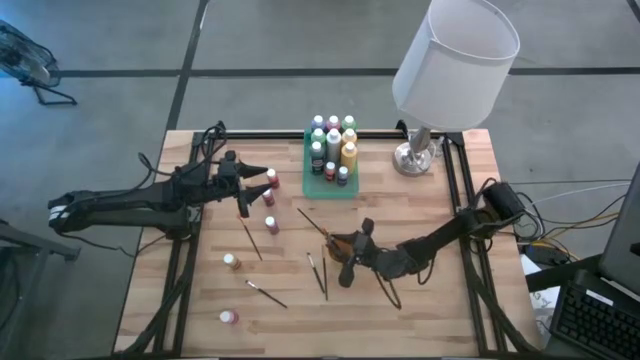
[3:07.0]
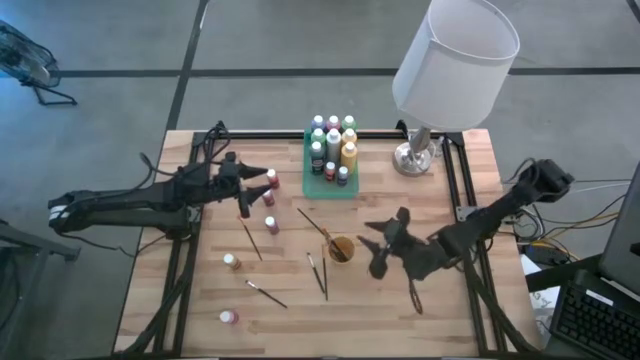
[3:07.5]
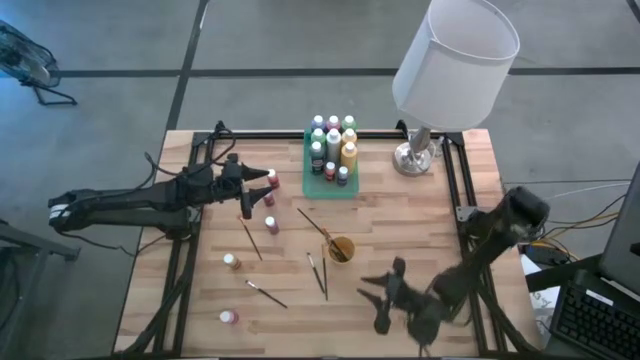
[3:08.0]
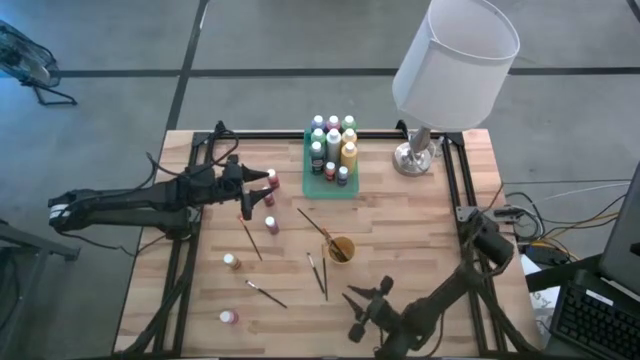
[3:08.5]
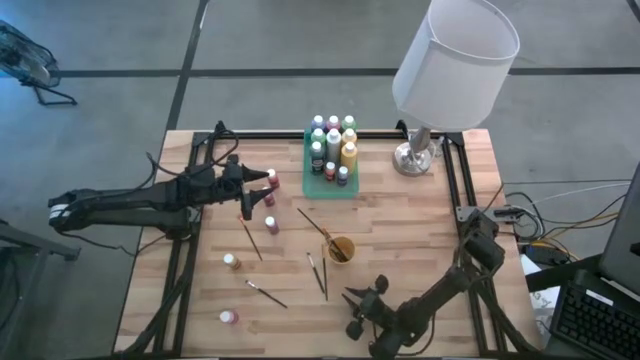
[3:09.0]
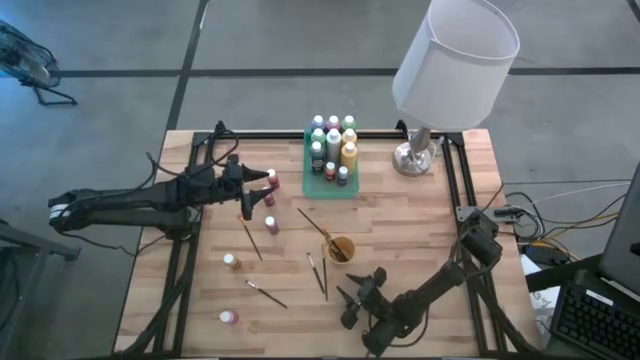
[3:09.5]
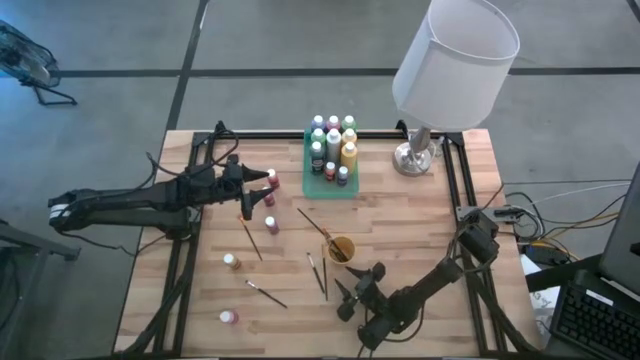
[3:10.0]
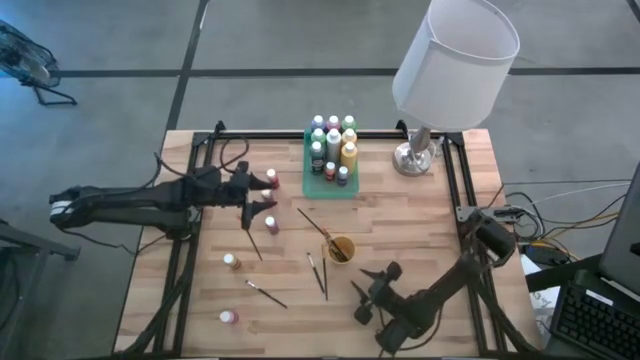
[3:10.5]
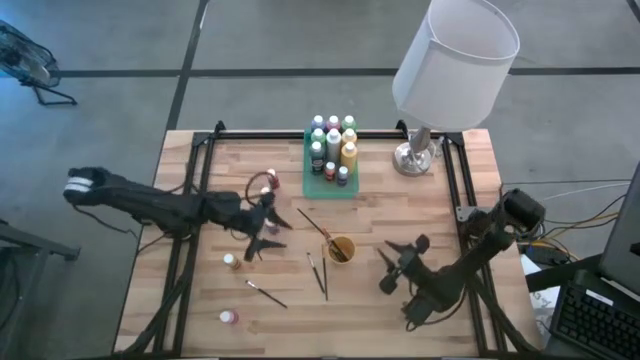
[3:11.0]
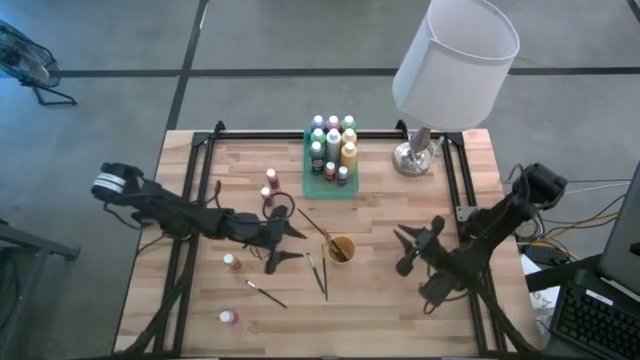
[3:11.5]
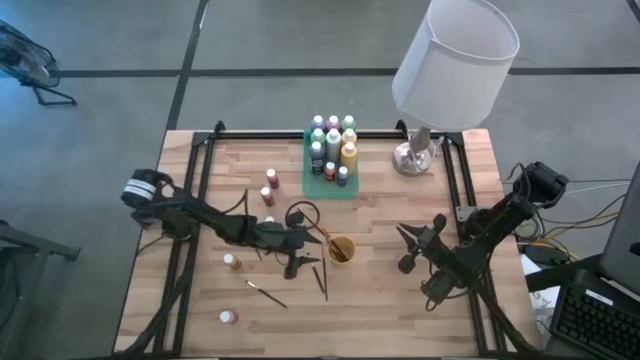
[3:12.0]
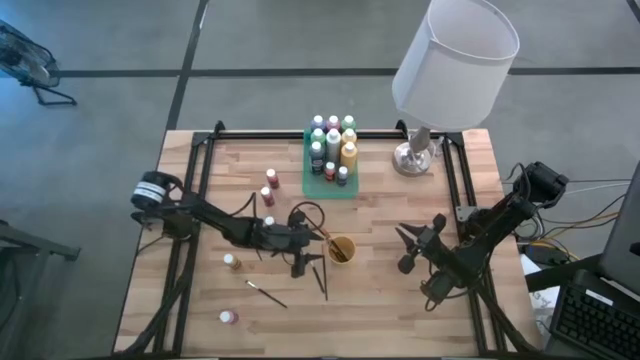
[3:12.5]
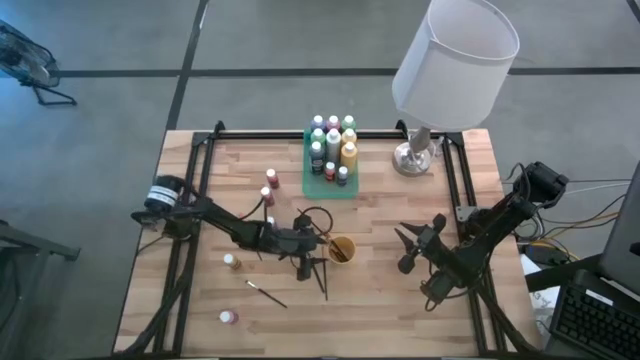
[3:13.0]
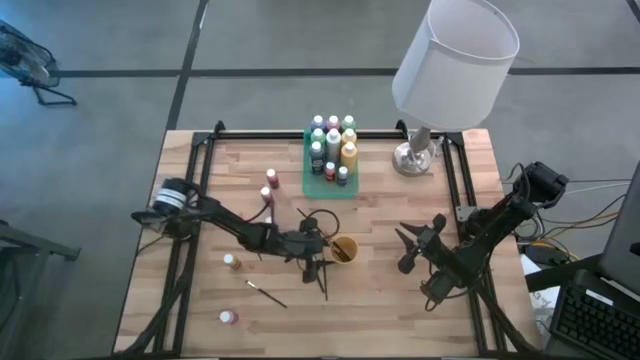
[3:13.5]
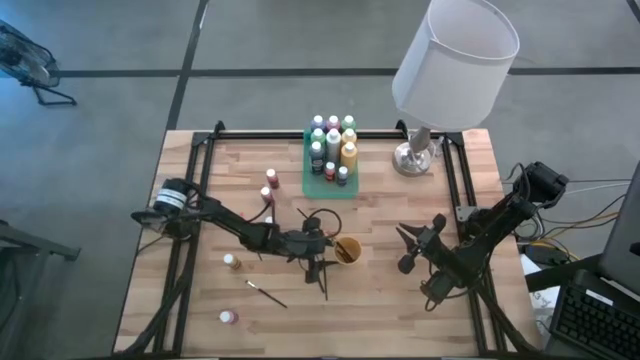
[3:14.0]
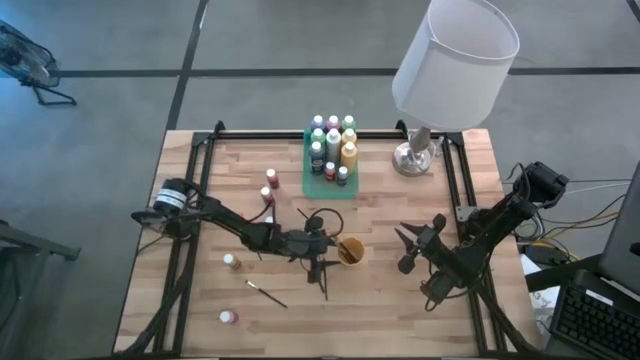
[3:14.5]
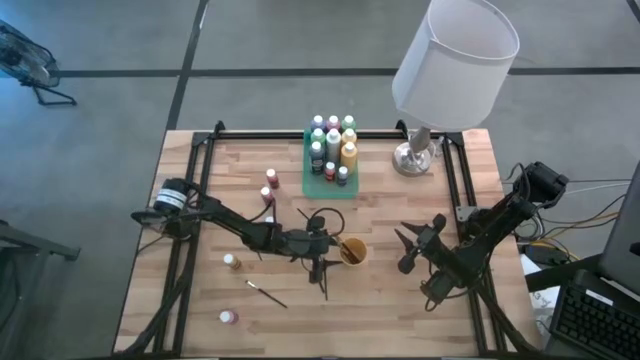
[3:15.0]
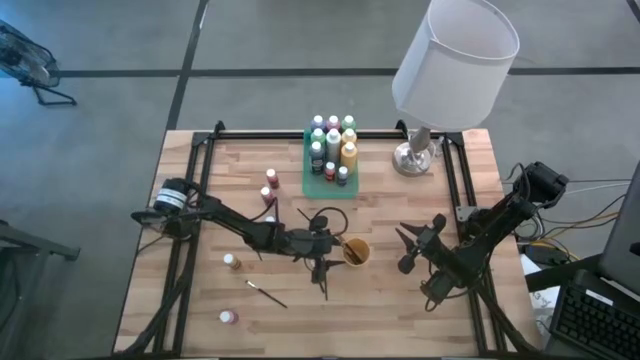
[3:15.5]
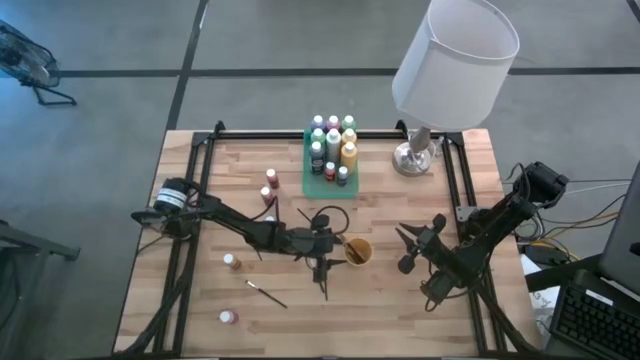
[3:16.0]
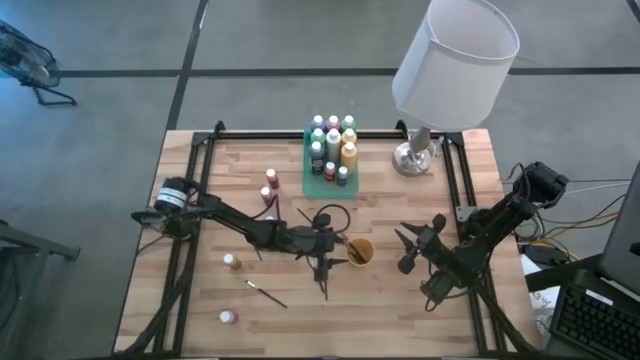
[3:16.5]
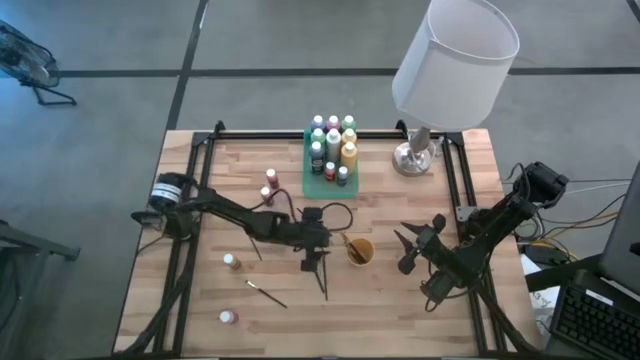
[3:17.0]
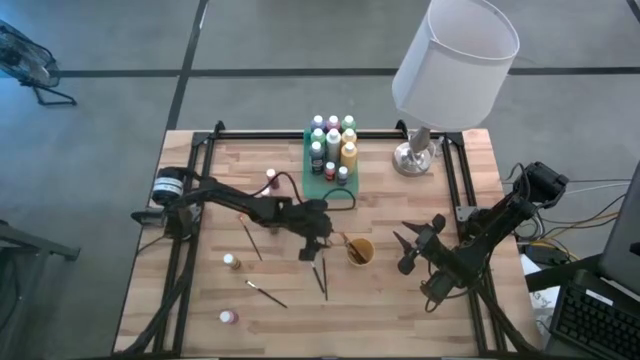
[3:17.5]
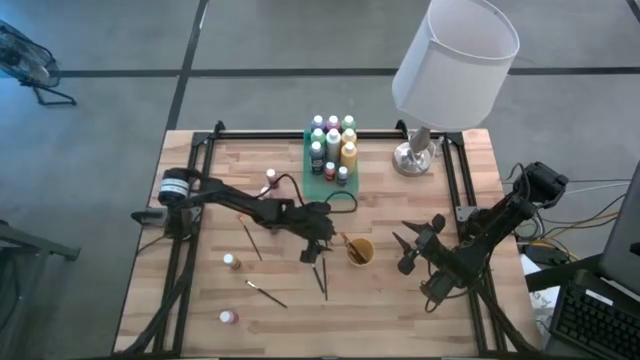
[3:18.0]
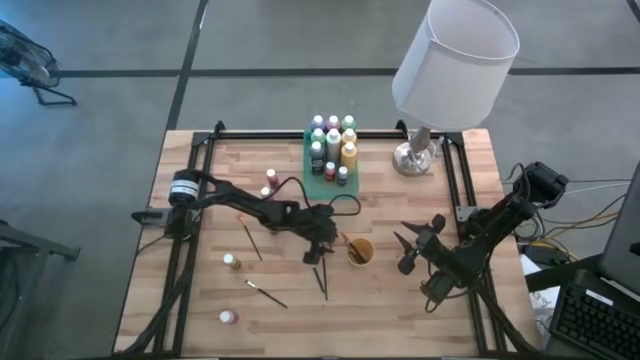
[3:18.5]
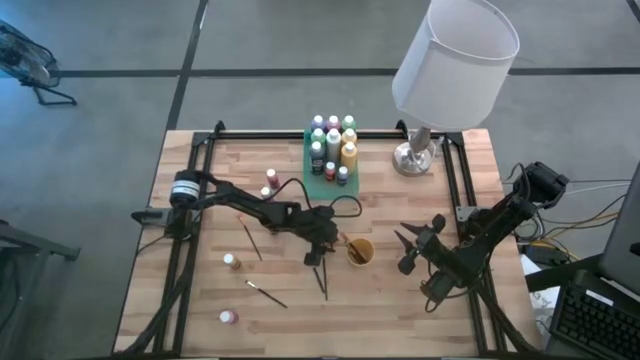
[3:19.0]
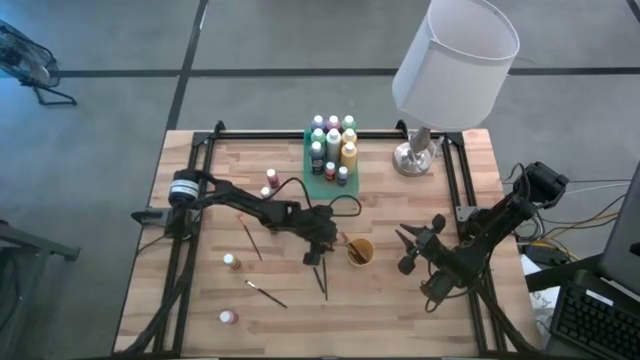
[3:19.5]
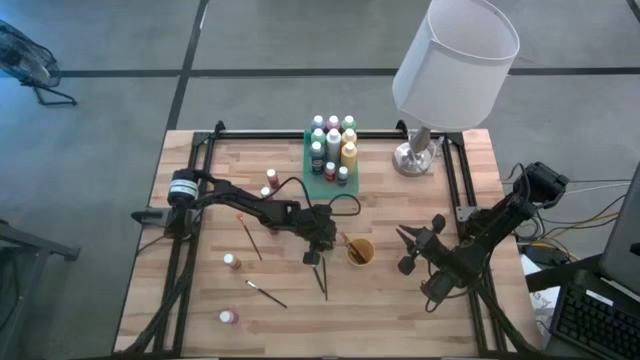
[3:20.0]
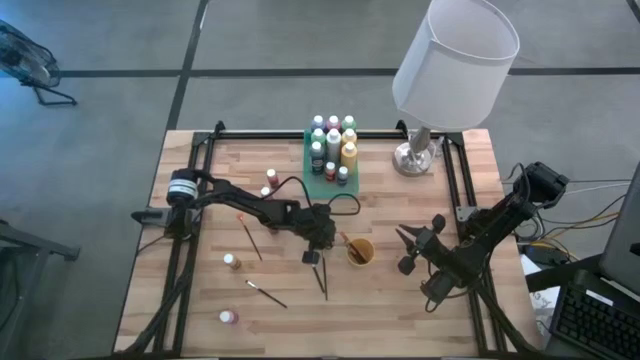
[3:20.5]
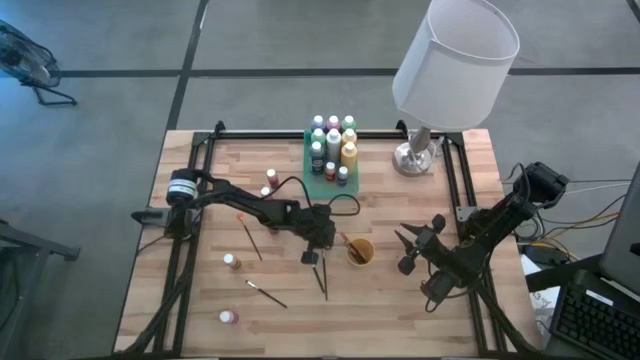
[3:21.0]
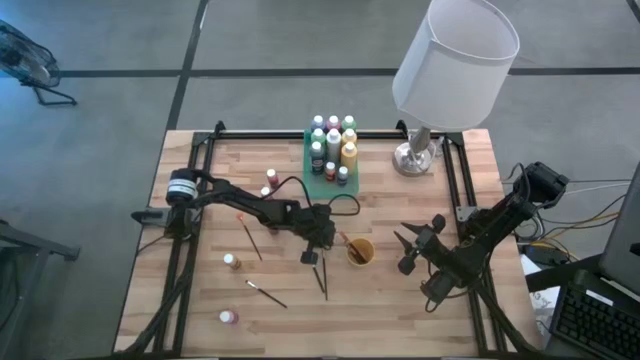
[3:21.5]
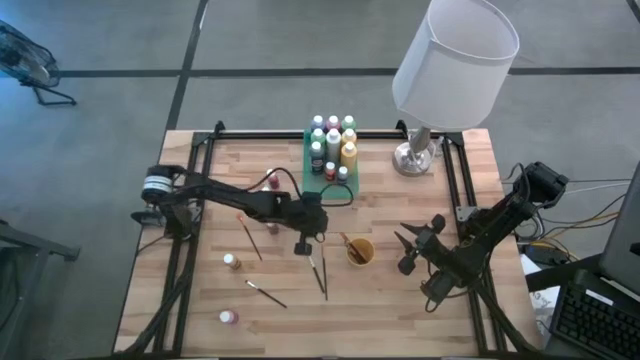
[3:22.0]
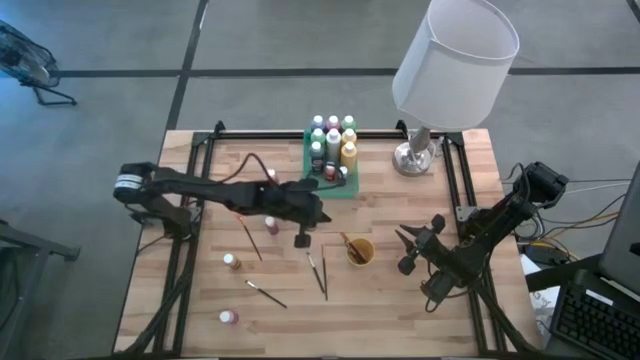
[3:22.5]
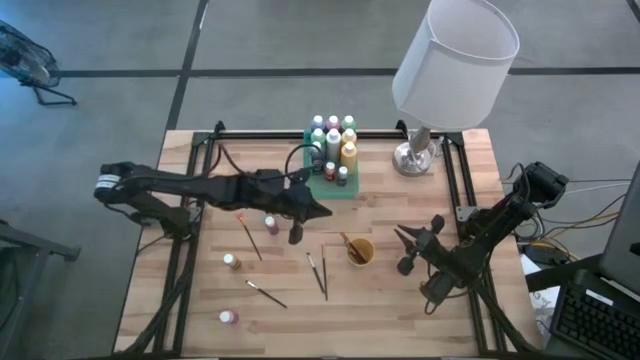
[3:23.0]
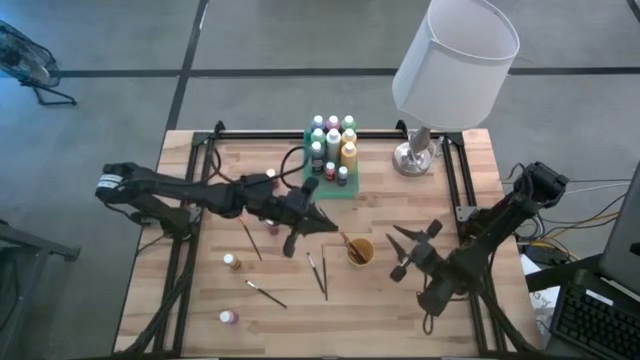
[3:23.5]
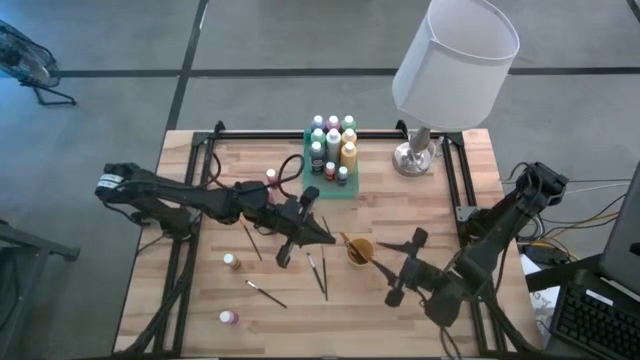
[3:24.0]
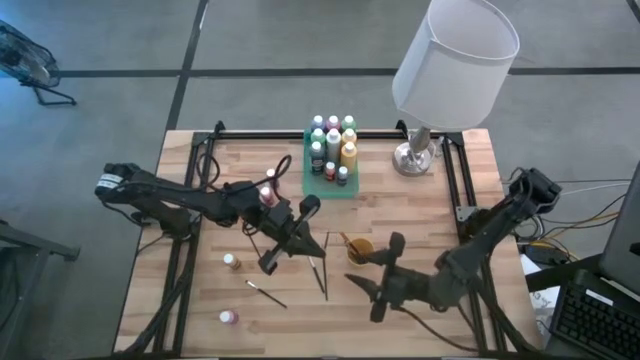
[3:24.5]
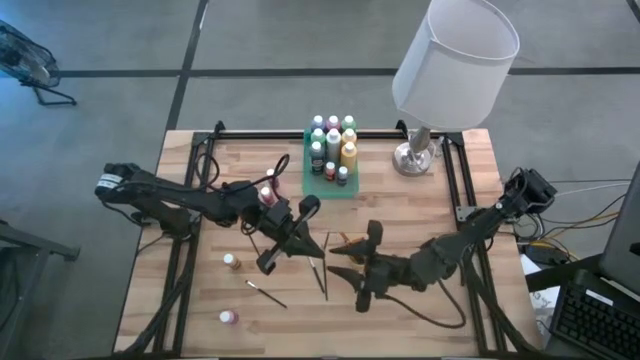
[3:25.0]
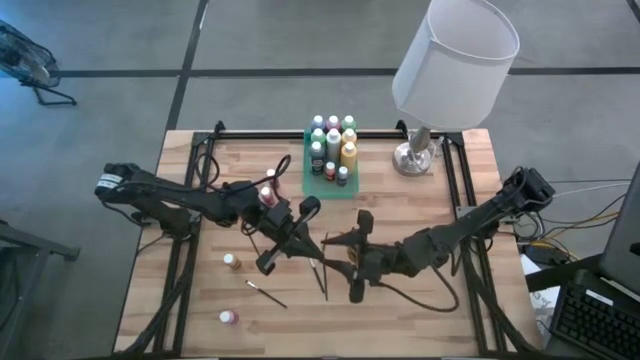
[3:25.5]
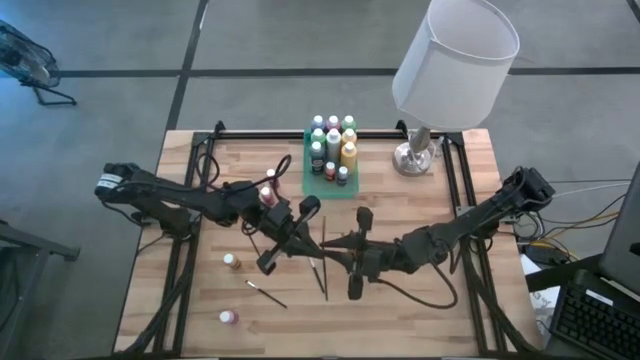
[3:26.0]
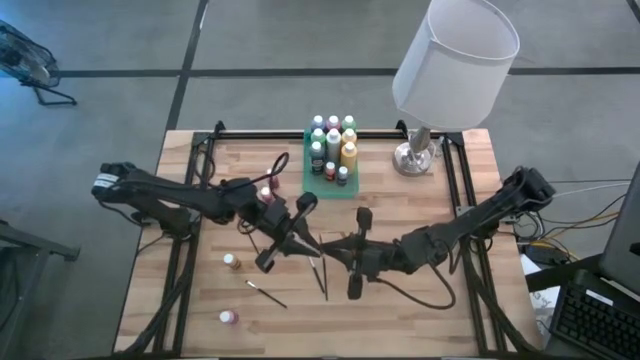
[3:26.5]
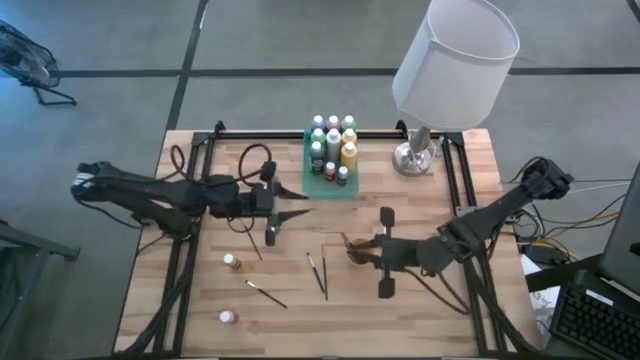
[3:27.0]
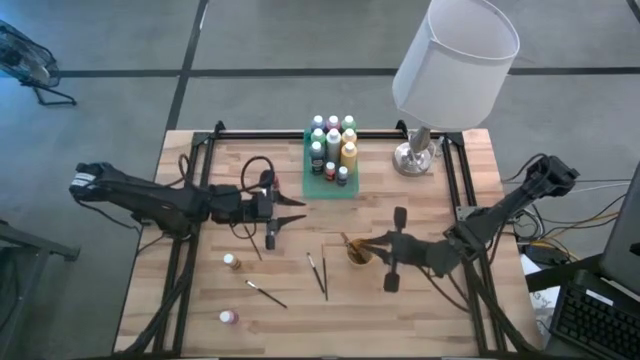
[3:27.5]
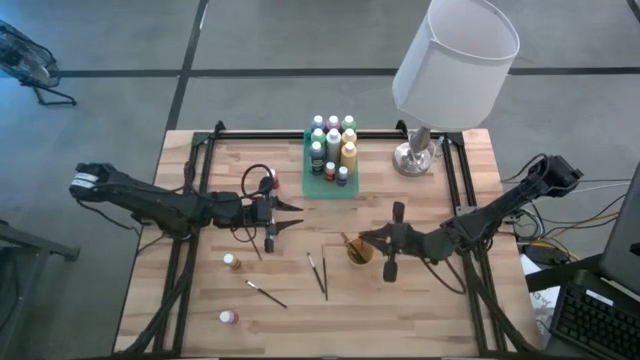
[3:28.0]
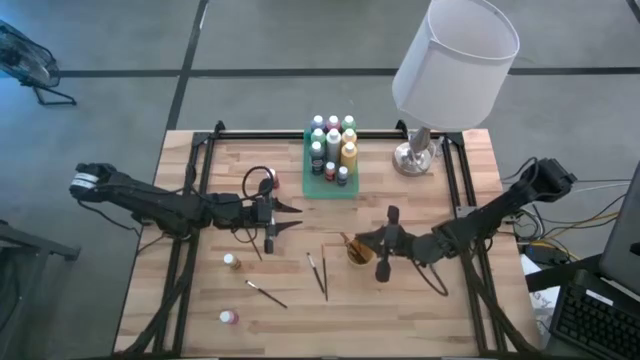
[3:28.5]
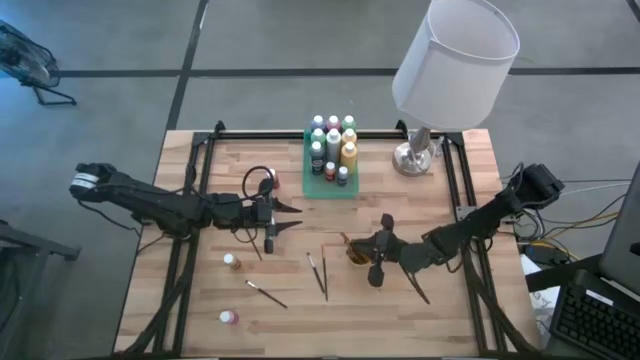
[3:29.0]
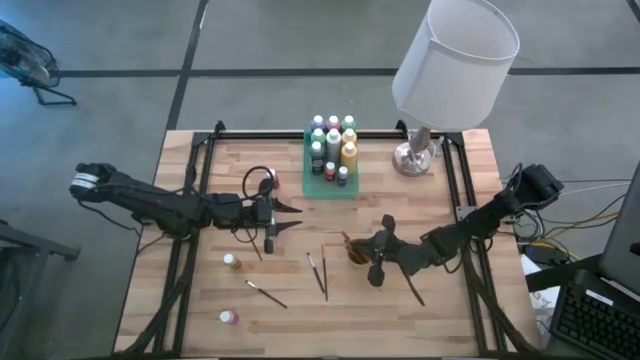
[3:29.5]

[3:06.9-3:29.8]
Task: Pick & Place Paint Supplies
Put the orange paintbrush into the yellow cup
